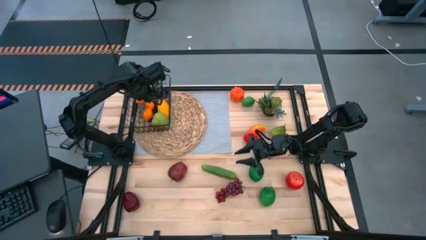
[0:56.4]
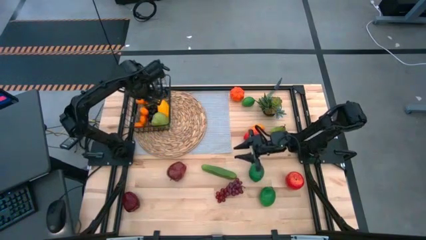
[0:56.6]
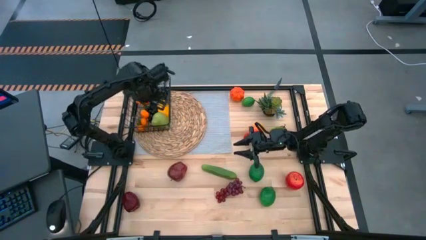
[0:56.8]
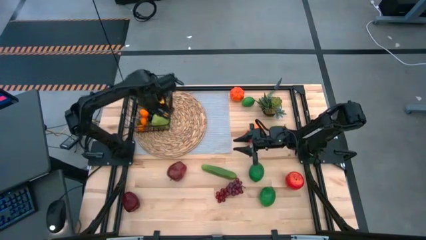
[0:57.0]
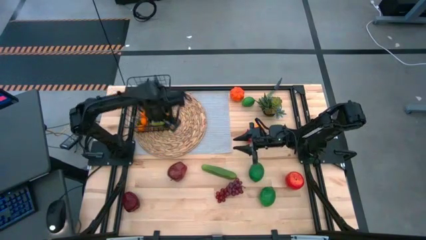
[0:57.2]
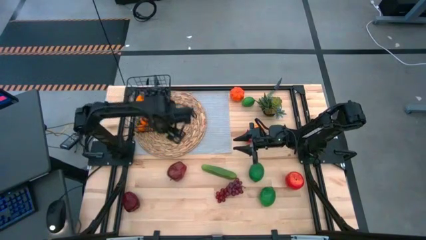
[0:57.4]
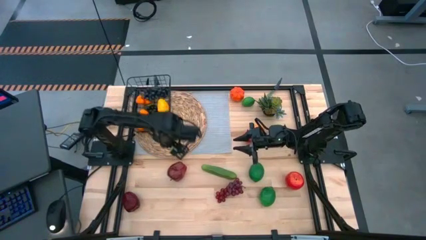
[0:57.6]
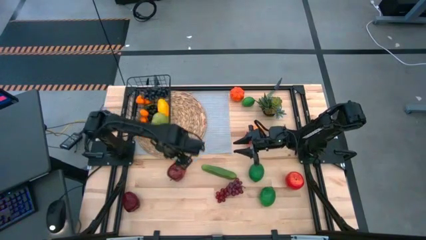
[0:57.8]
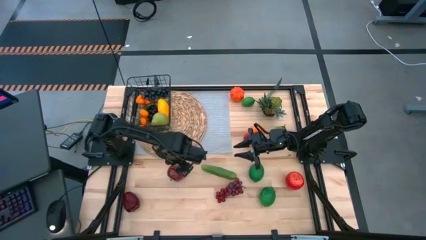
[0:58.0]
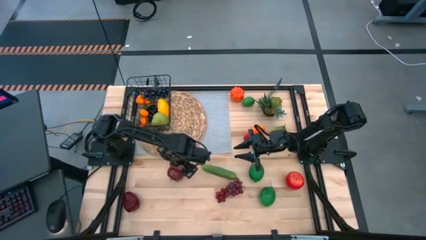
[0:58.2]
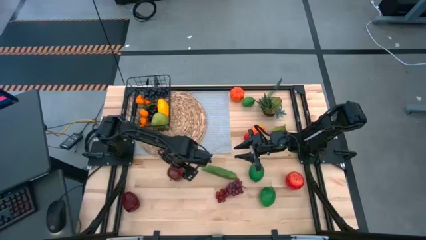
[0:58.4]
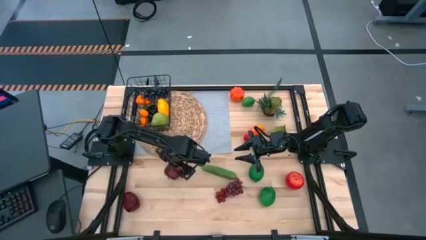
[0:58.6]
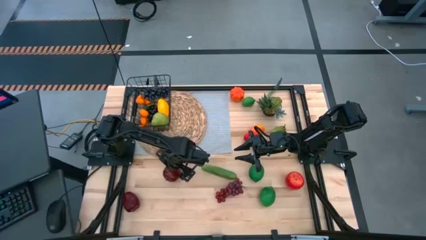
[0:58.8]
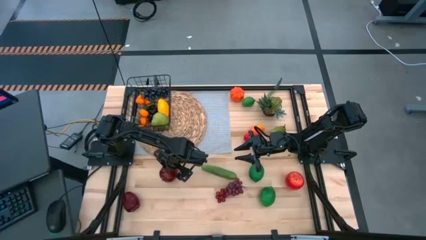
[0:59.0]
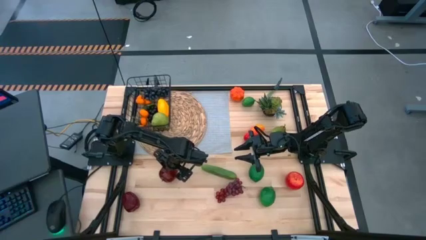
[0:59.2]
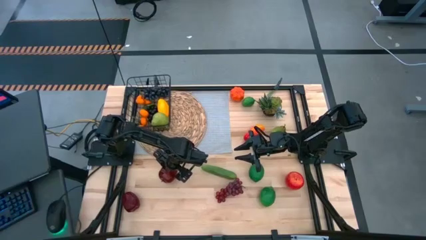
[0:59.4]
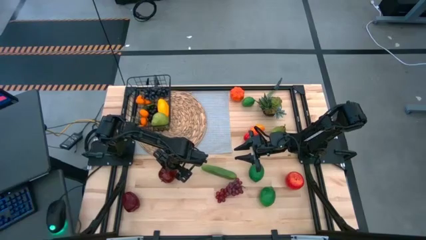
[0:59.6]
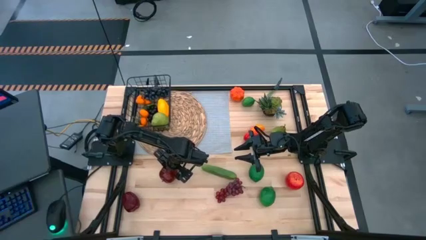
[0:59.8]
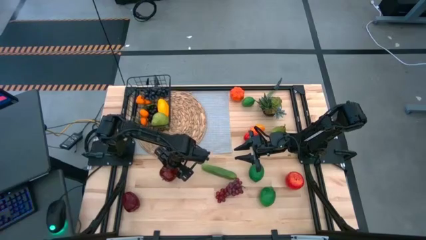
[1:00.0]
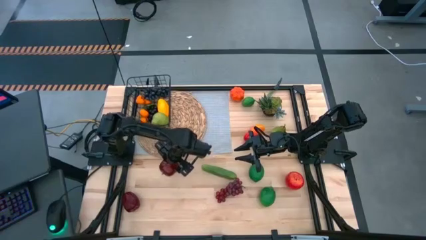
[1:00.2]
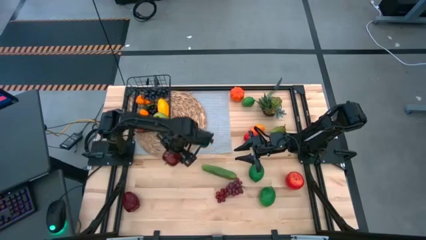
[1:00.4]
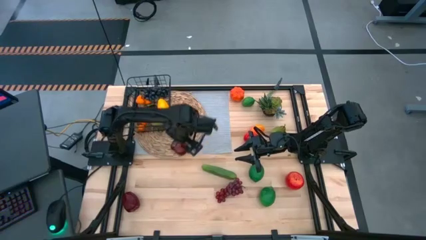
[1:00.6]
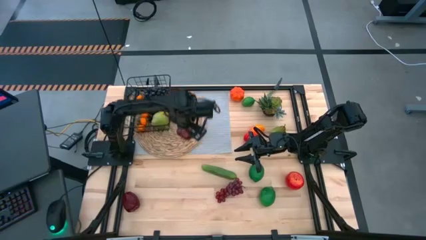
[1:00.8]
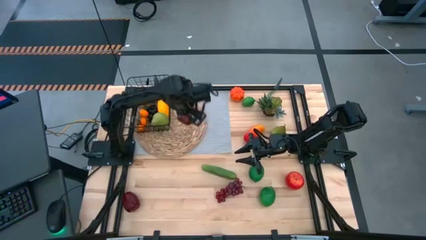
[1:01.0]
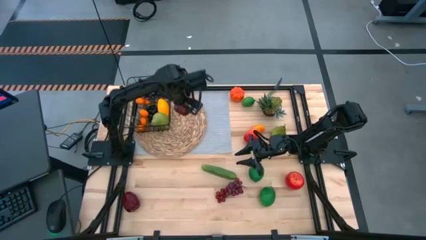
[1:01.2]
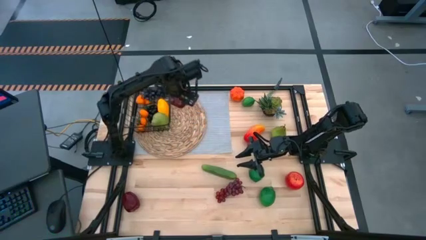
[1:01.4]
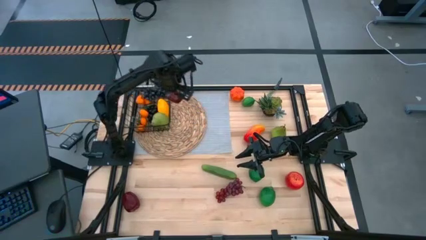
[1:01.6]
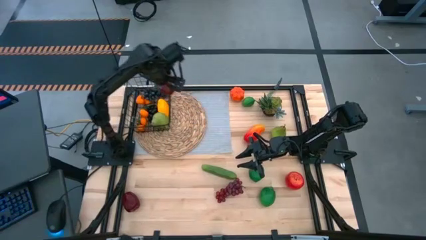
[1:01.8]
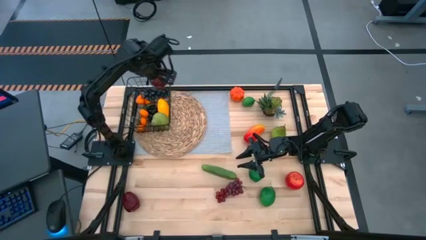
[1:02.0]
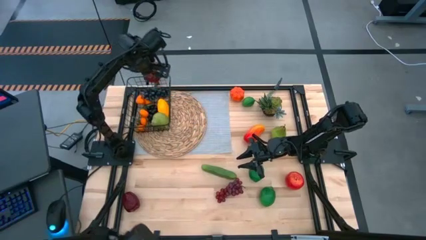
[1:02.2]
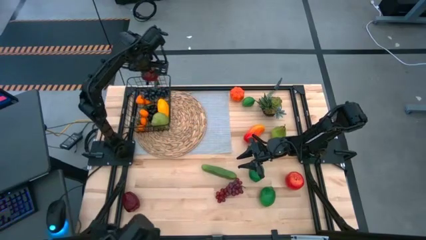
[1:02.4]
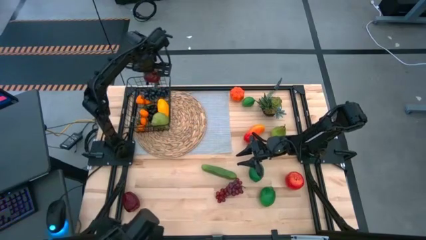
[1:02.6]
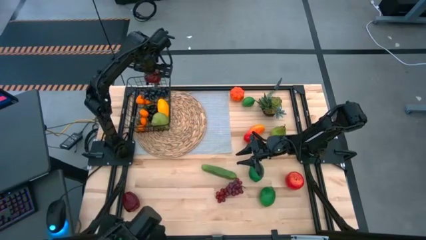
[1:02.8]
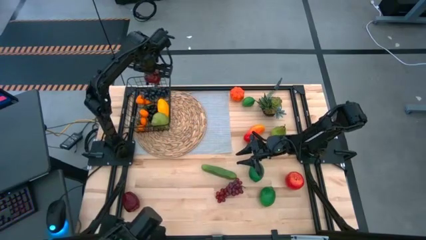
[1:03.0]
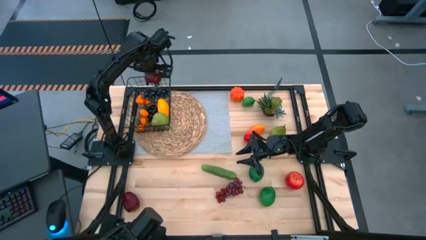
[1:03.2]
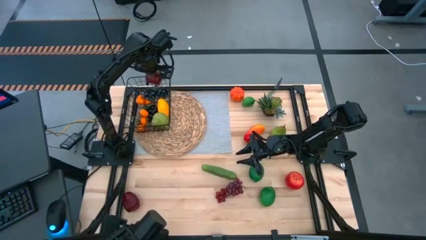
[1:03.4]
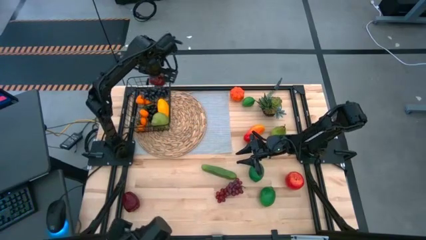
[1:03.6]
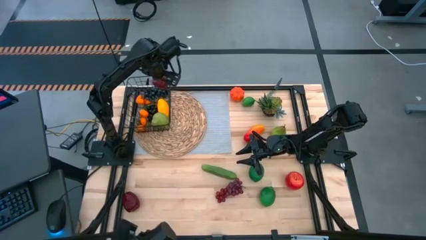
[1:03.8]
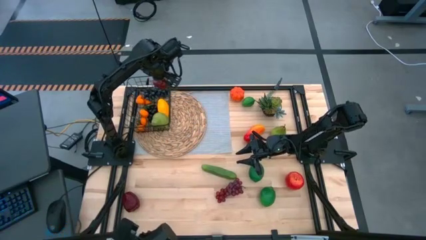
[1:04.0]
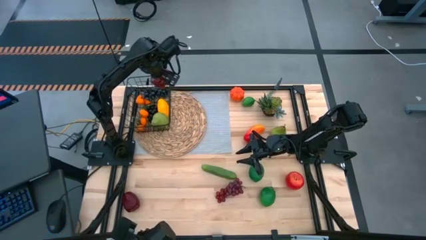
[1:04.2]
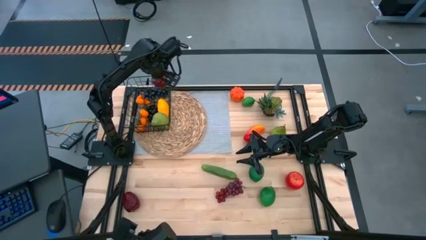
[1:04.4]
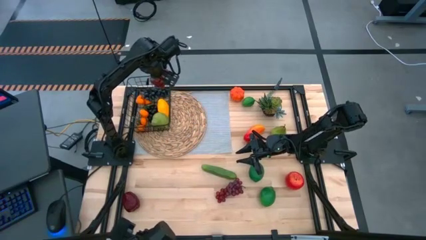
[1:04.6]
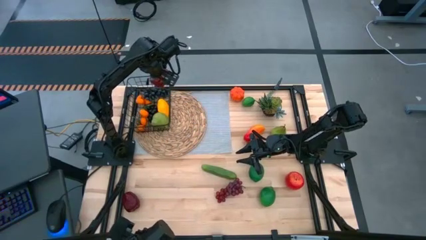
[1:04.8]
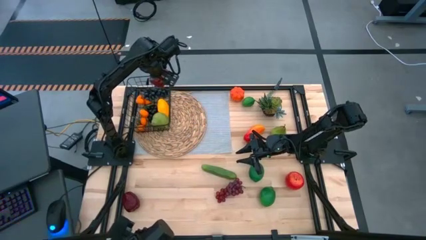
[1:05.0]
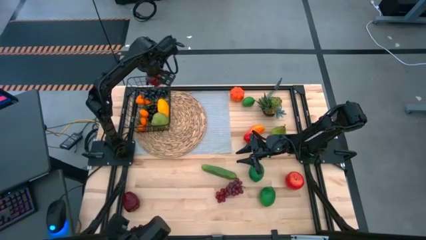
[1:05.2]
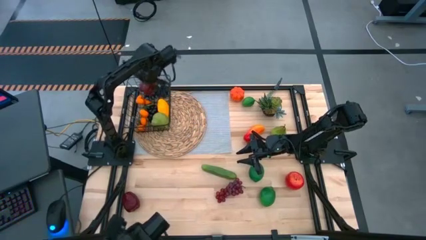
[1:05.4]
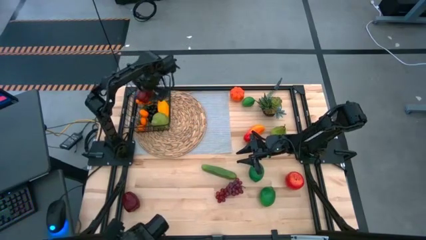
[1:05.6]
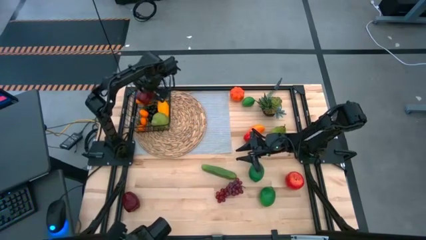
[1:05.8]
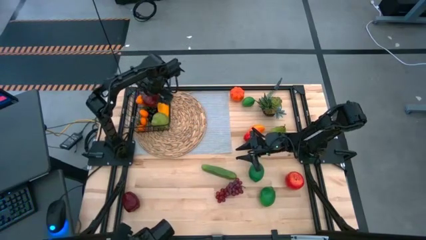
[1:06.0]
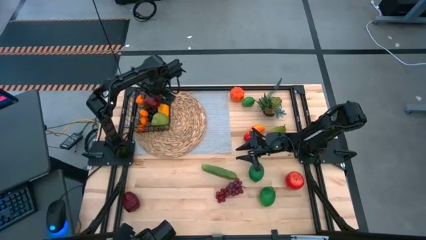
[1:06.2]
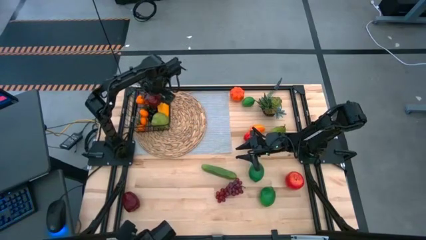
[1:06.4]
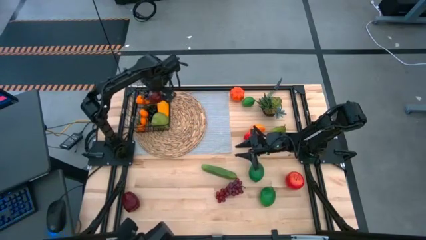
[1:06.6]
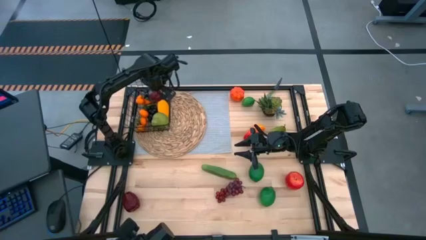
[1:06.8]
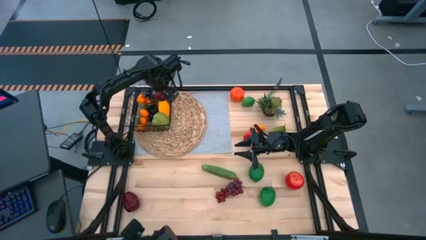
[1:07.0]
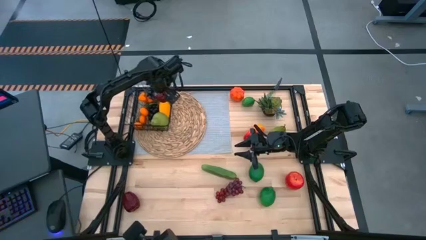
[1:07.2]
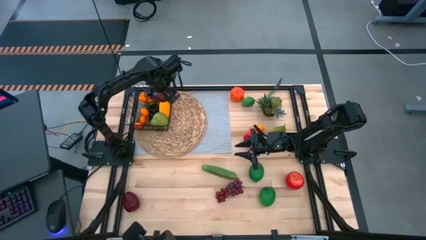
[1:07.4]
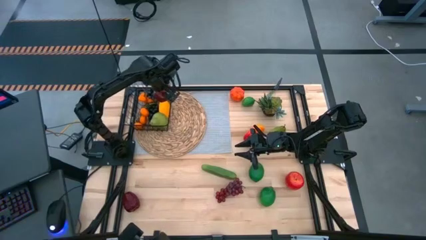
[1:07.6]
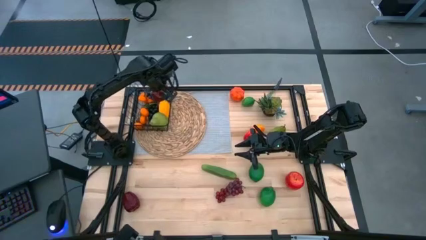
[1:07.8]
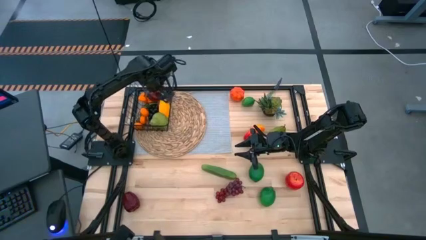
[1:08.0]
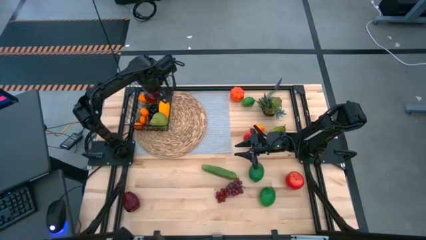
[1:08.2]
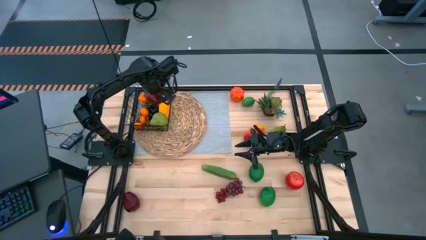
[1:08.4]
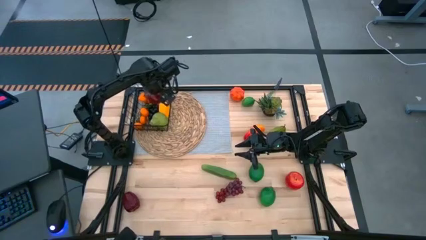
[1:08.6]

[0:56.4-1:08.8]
Task: Build produce basket
Put the right dark red apple into the wire basket
